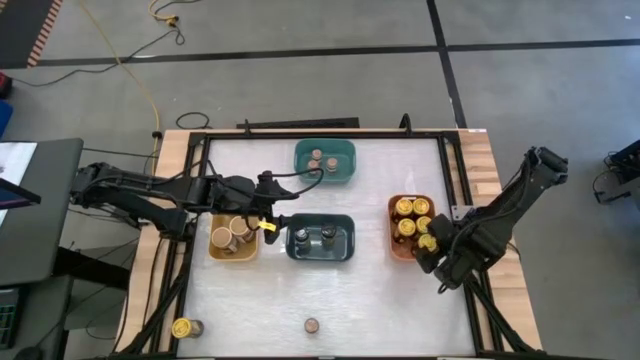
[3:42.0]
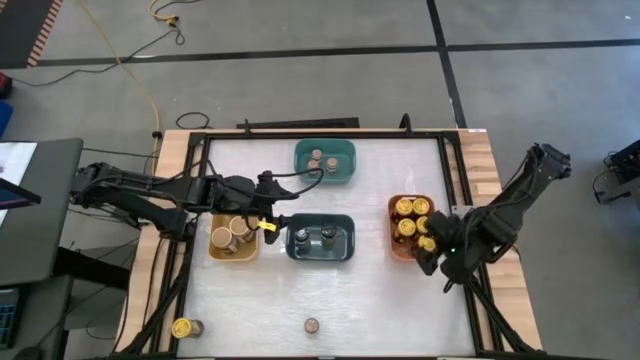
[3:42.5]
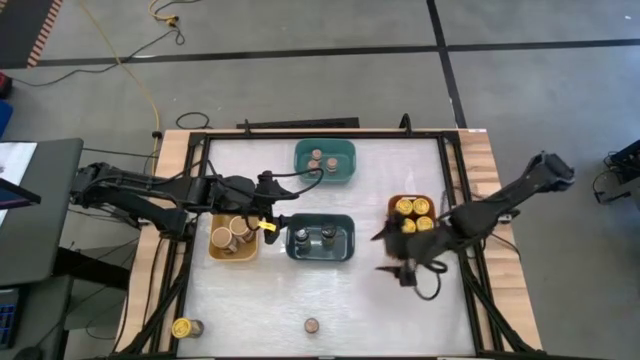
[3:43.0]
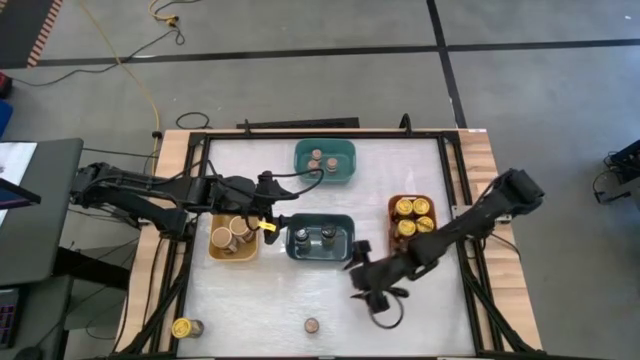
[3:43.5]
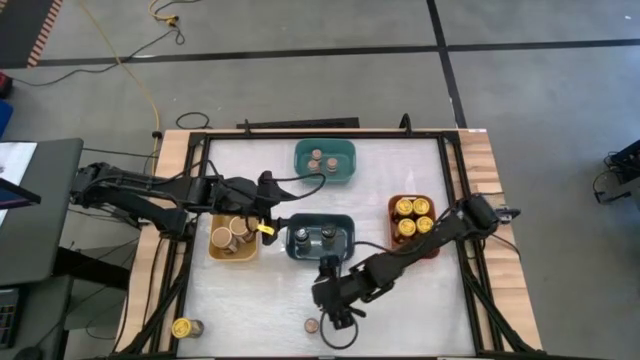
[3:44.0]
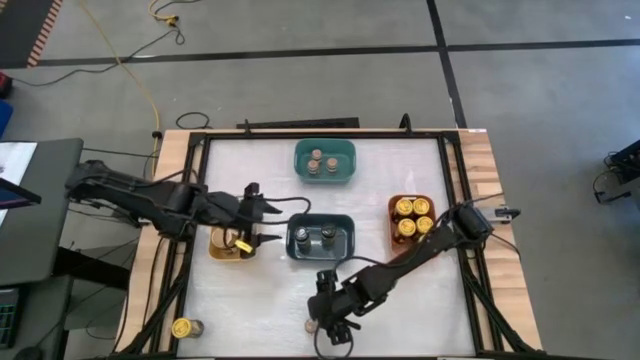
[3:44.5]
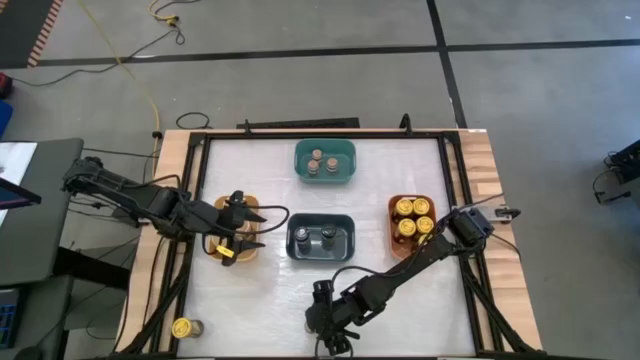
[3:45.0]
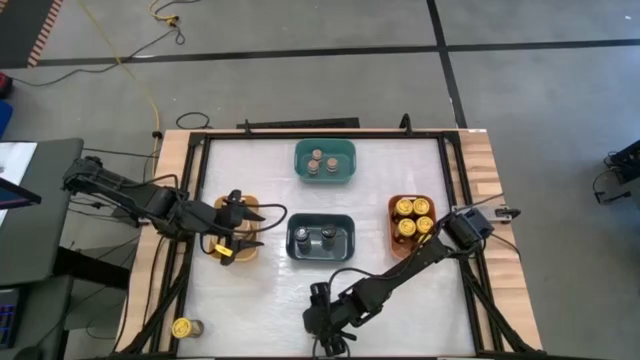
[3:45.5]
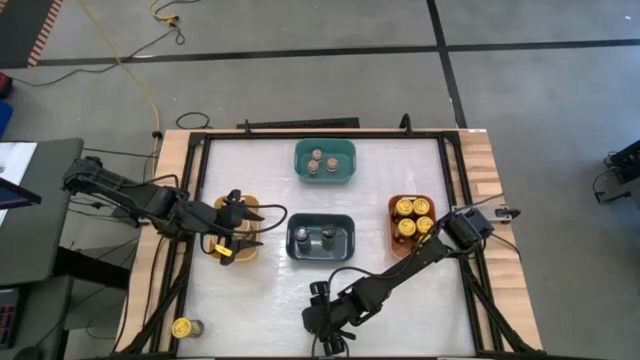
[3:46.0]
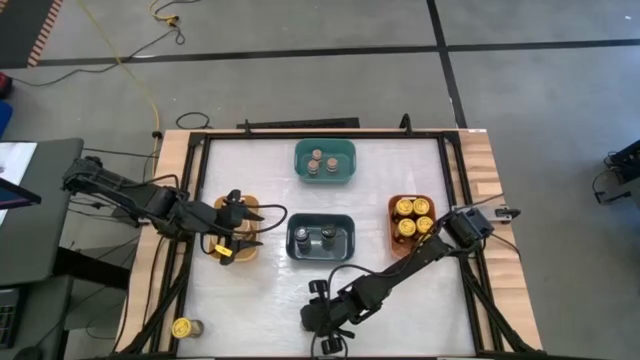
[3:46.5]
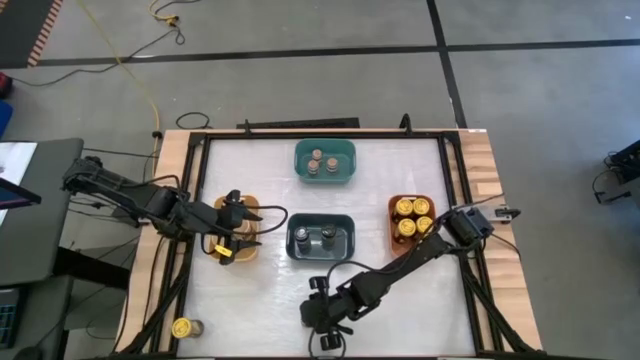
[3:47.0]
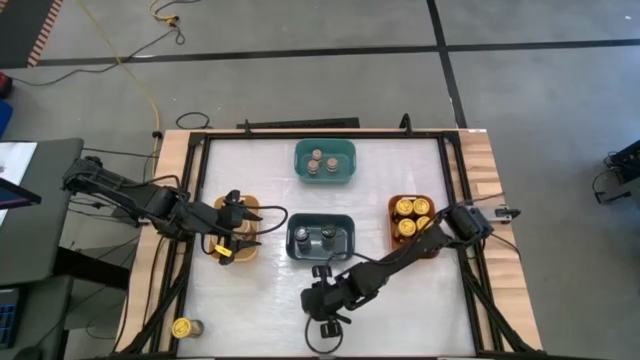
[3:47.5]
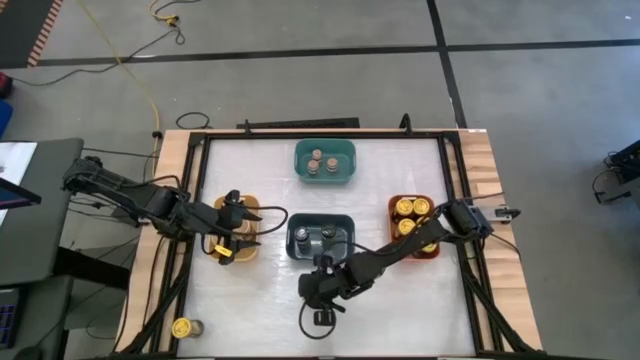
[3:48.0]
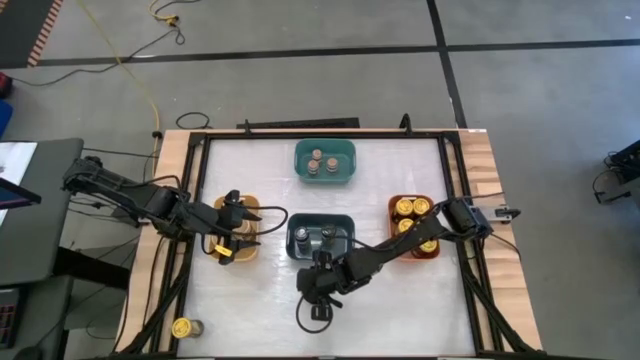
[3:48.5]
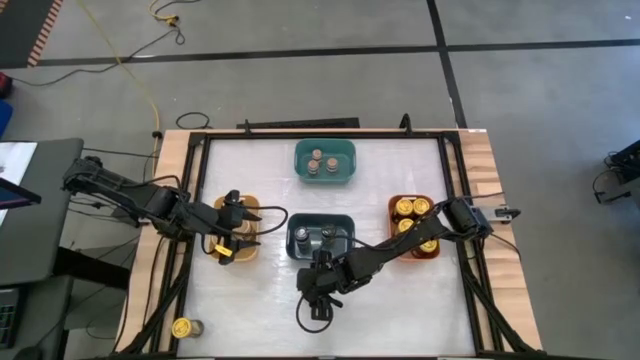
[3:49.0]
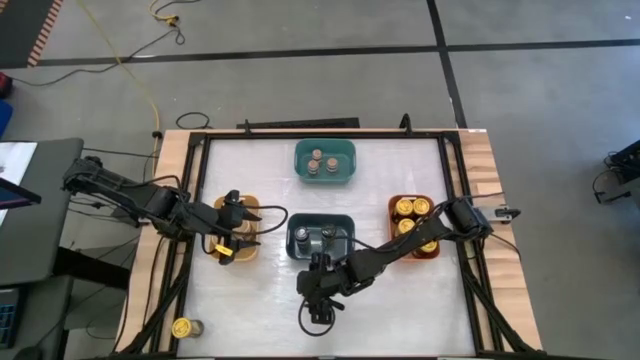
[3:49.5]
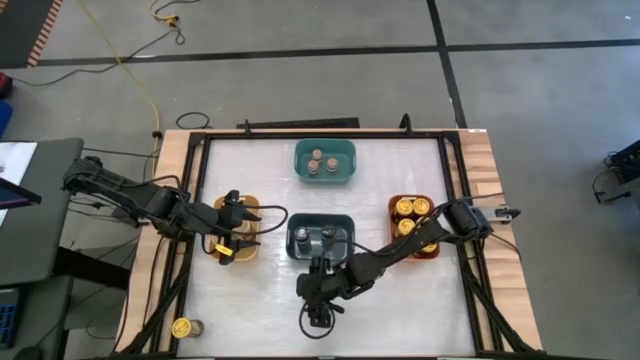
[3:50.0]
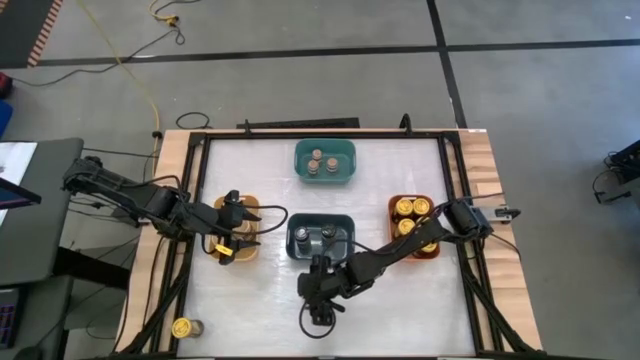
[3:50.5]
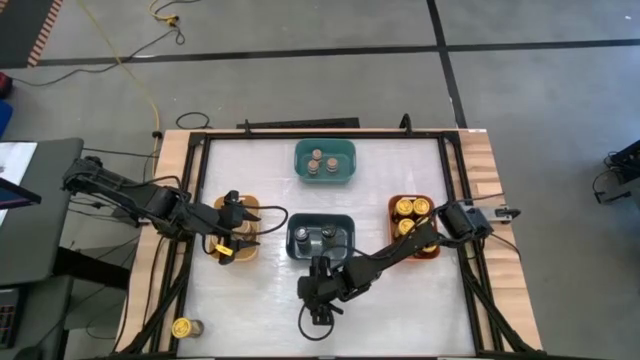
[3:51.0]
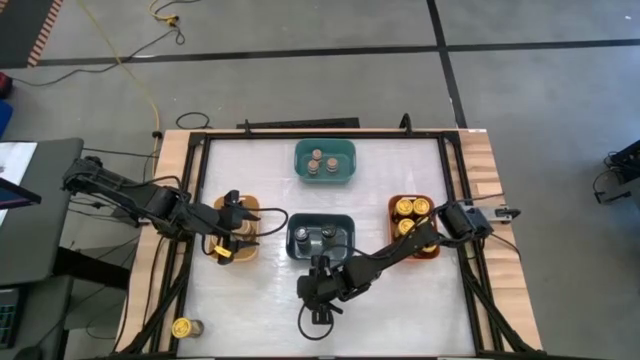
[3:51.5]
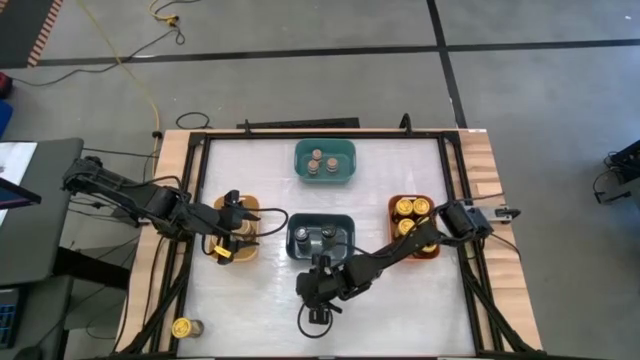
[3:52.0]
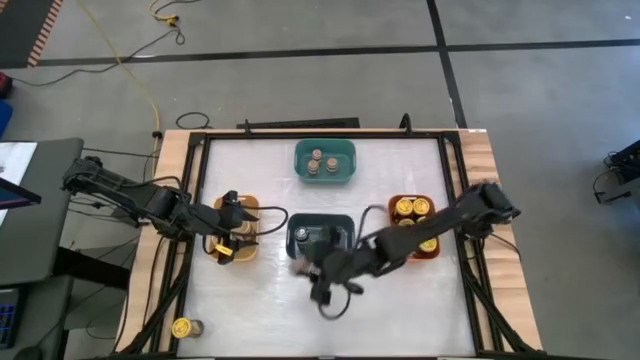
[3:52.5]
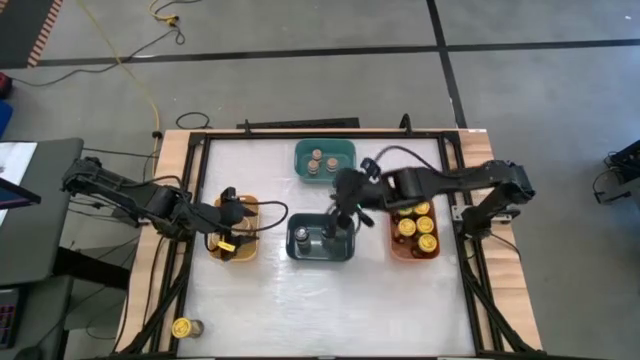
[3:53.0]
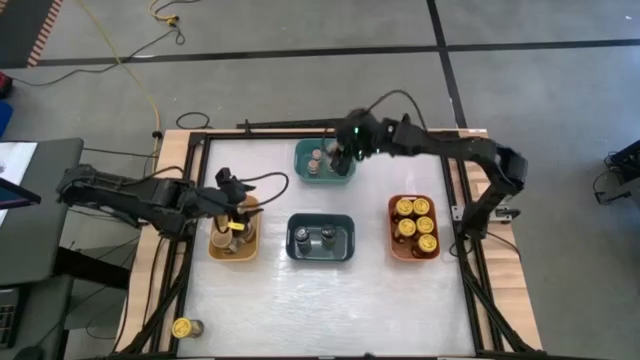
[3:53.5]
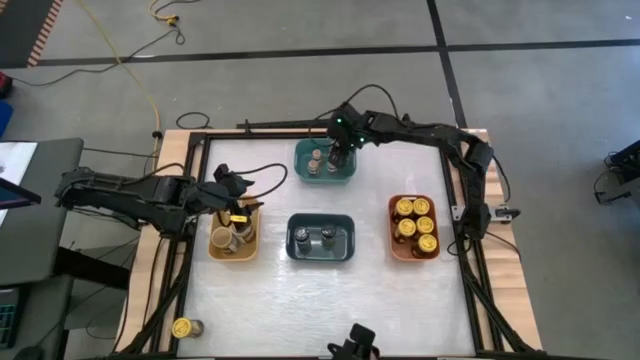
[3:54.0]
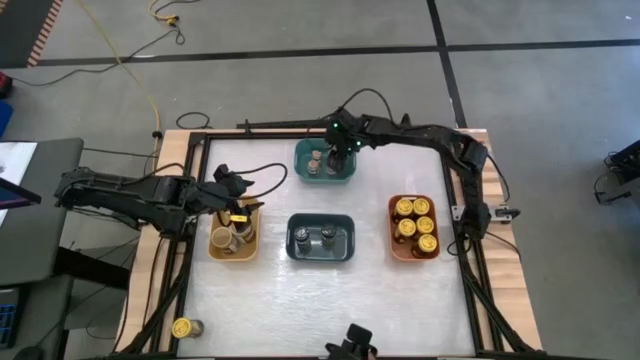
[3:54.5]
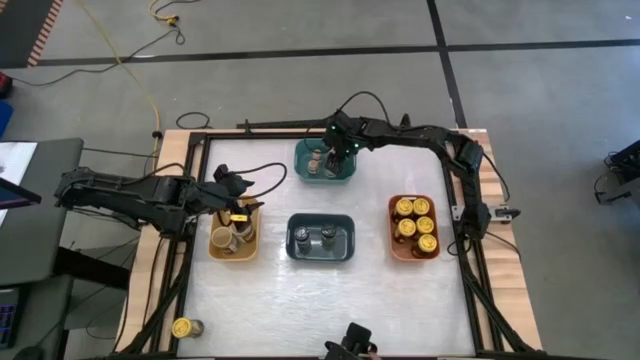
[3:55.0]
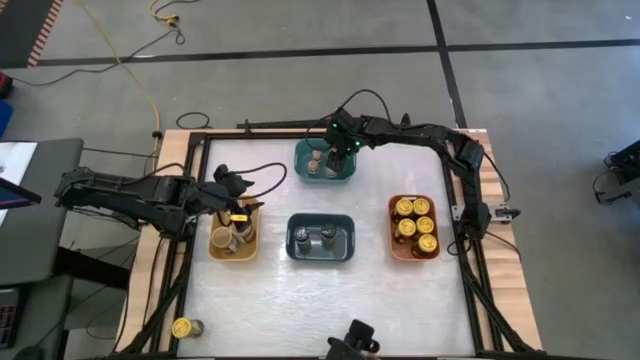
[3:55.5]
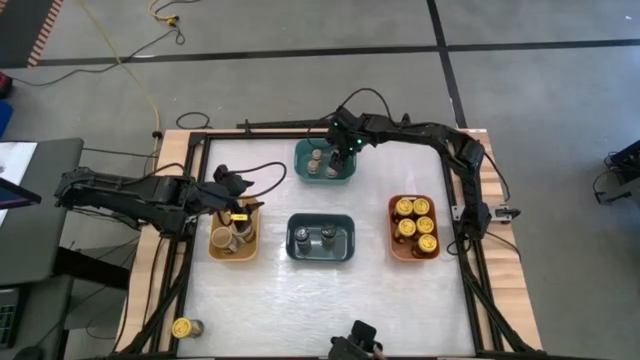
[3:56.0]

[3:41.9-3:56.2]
Task: Sort spices by type
Put the brown seasoning bottle into the green bin

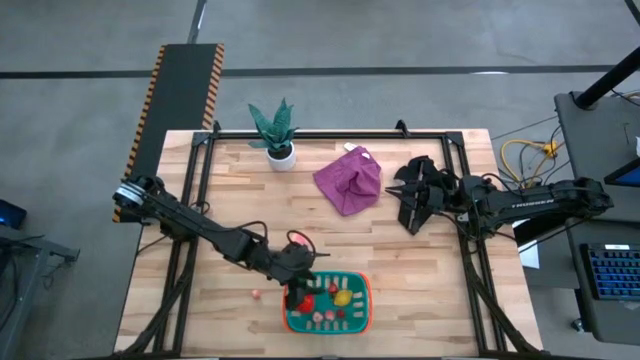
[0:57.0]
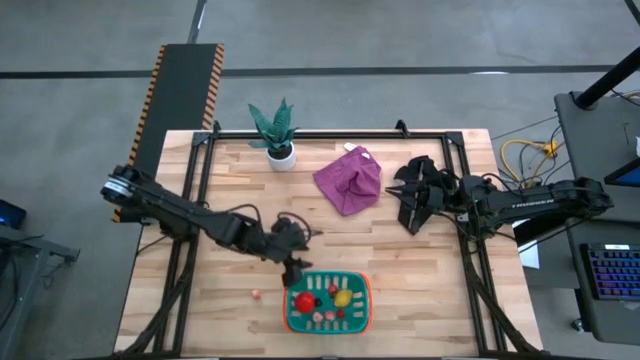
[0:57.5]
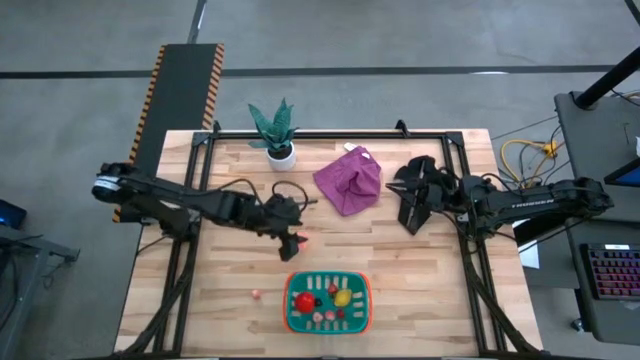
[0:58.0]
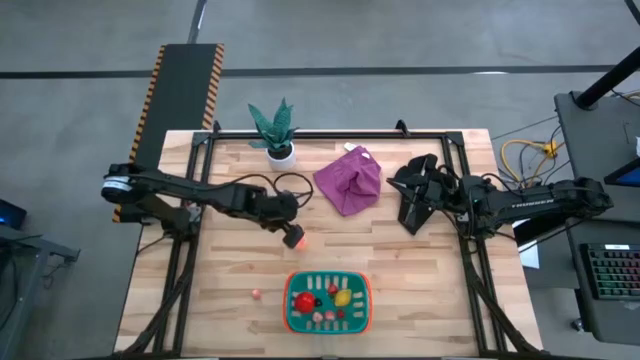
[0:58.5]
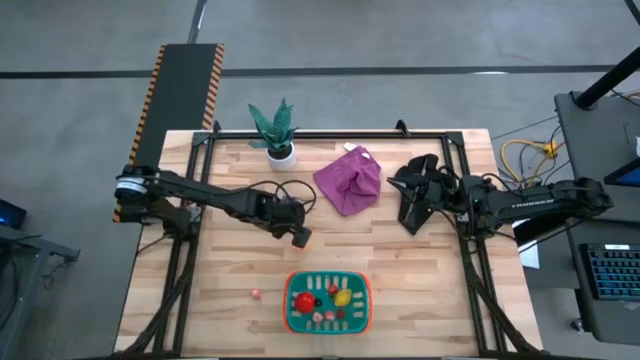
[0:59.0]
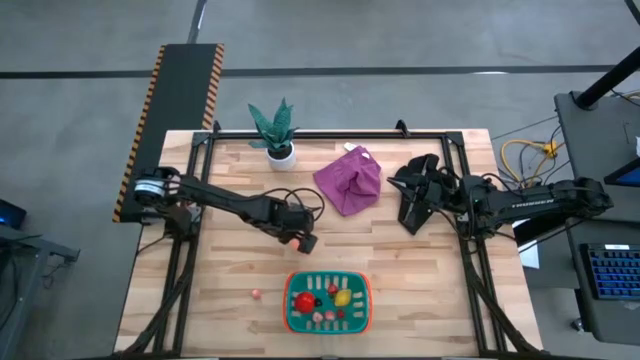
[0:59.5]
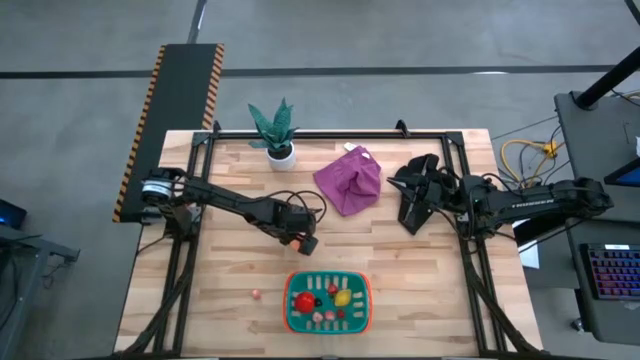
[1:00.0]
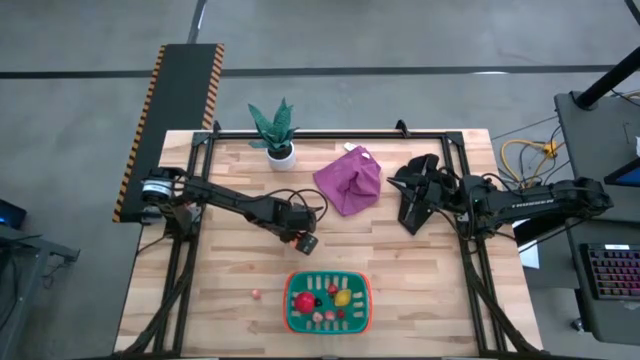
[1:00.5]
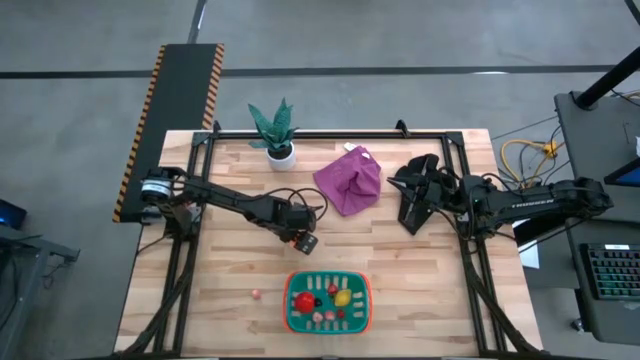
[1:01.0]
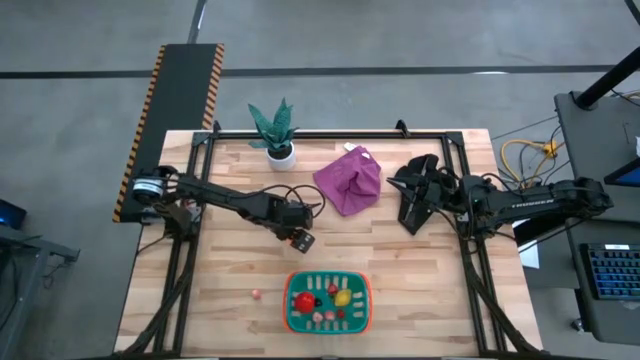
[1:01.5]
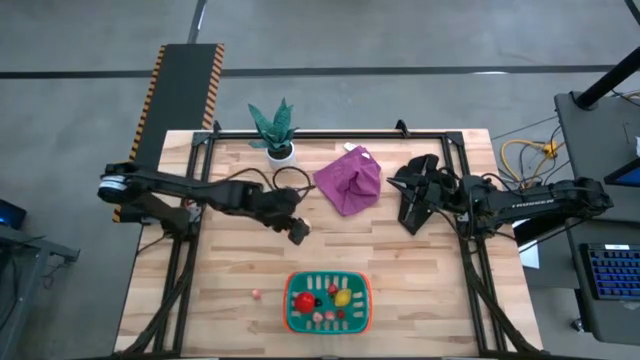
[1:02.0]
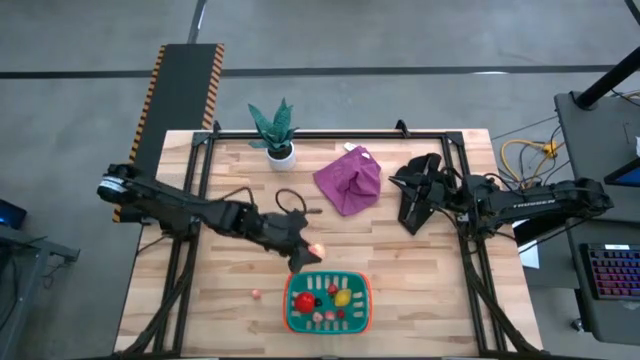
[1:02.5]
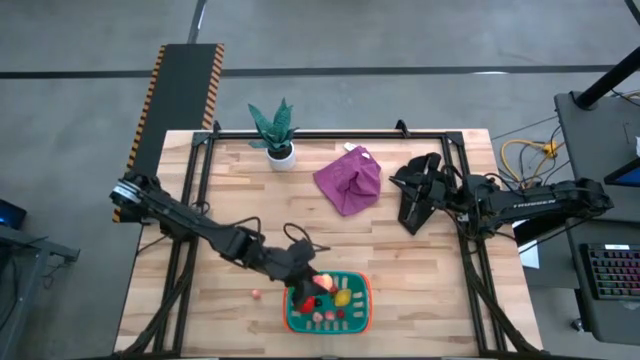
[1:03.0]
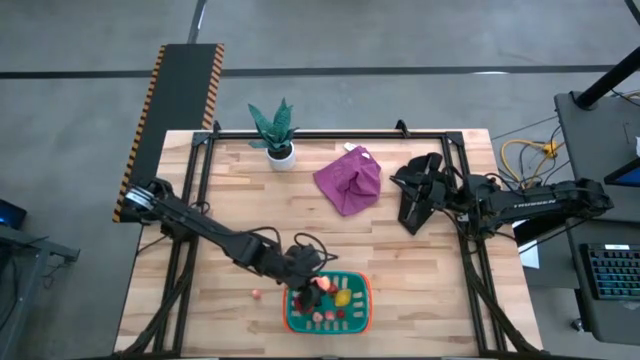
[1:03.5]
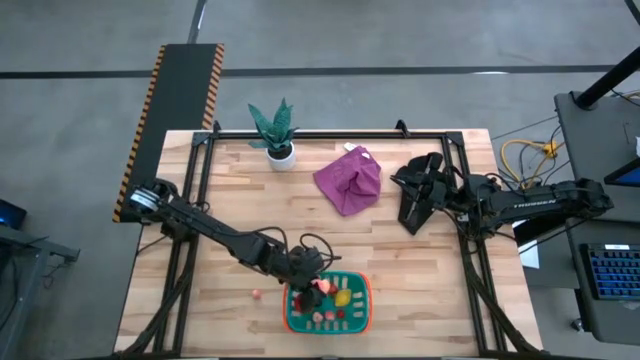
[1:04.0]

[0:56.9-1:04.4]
Task: Pick and placing Produce into tupperware
Put the pink peach into the green basket
